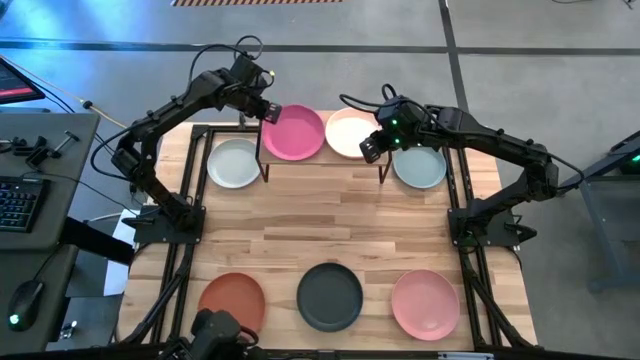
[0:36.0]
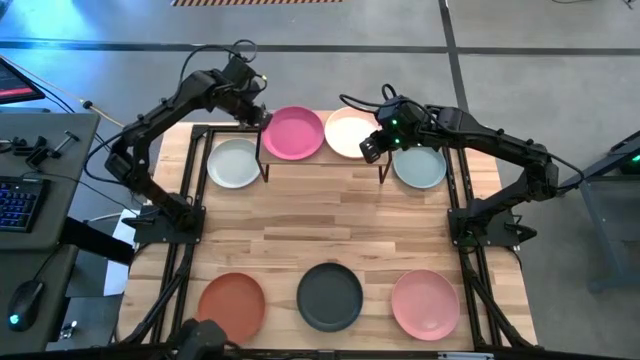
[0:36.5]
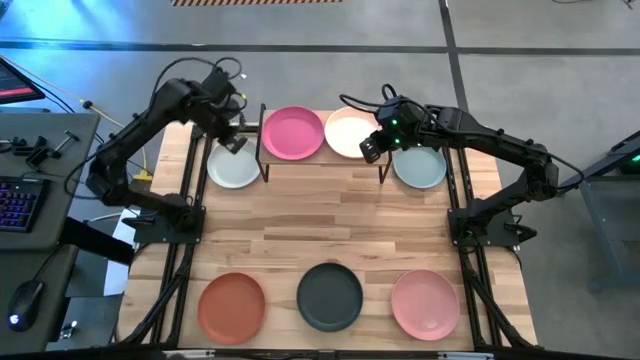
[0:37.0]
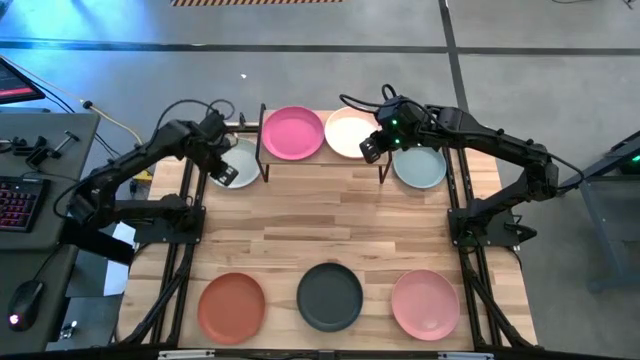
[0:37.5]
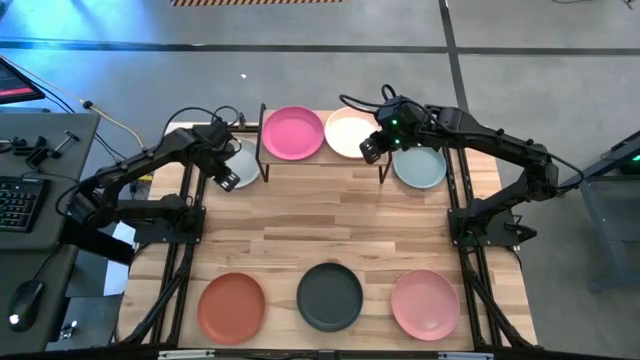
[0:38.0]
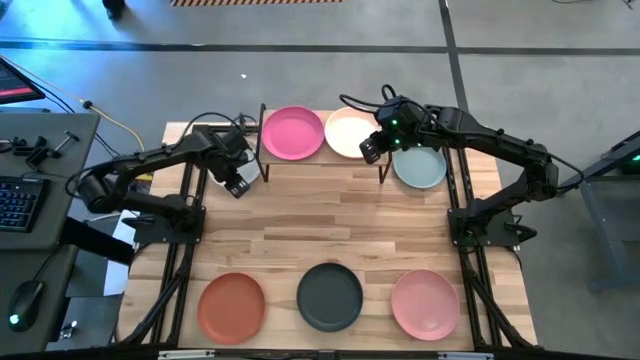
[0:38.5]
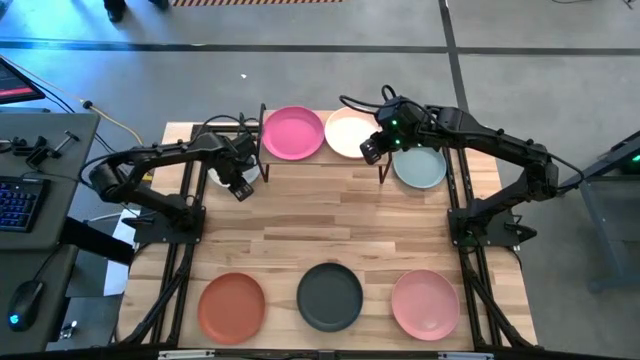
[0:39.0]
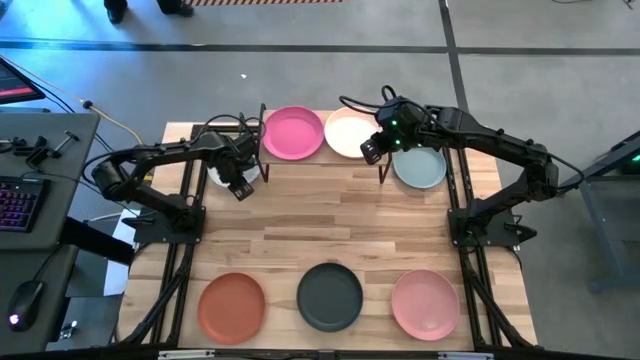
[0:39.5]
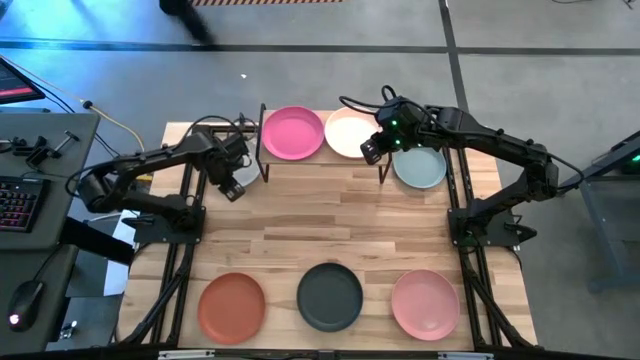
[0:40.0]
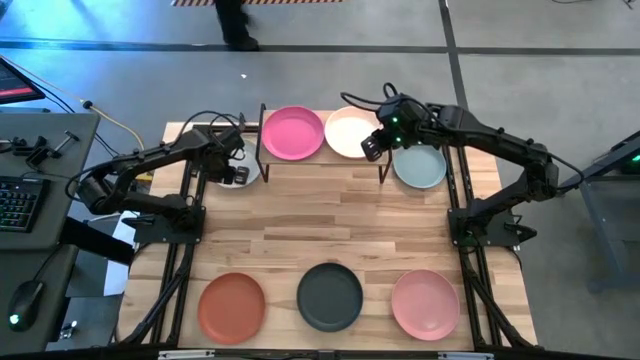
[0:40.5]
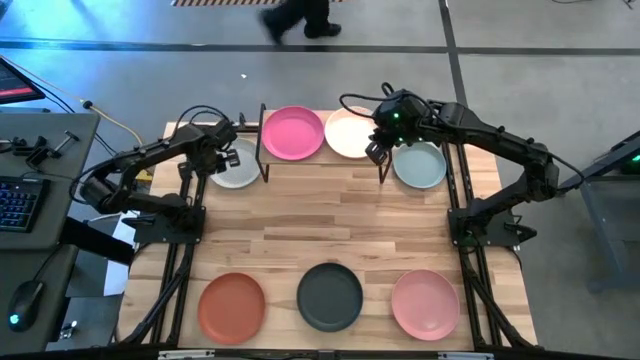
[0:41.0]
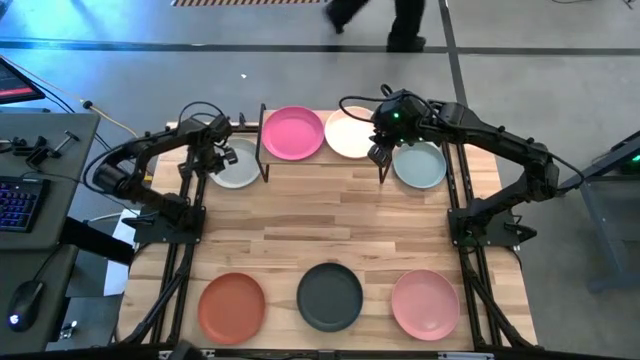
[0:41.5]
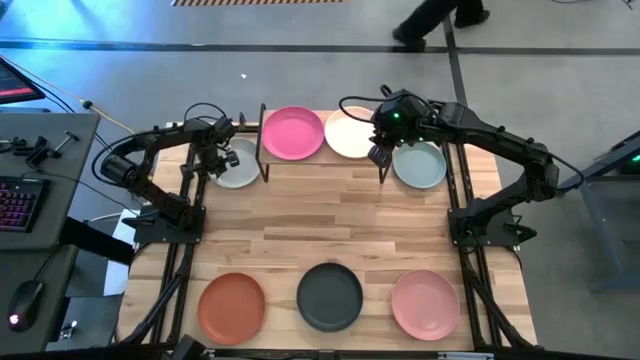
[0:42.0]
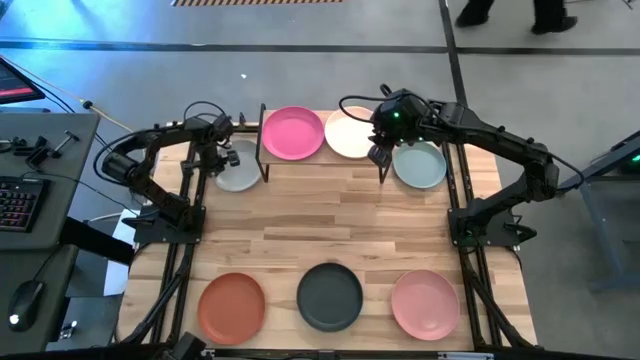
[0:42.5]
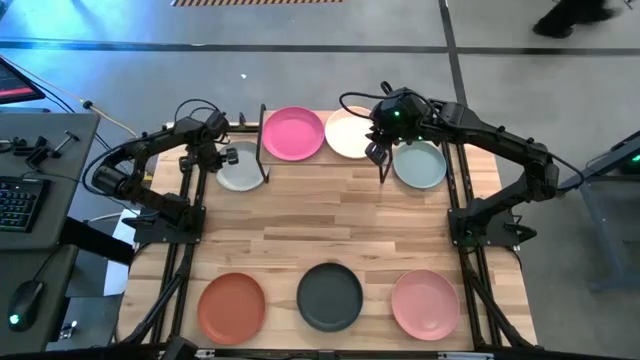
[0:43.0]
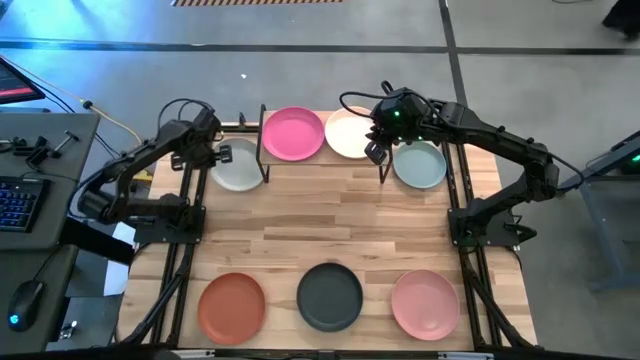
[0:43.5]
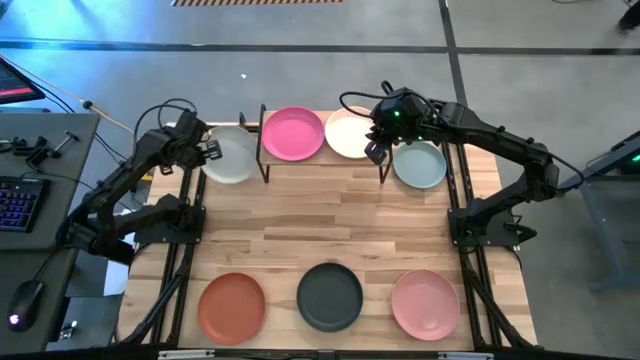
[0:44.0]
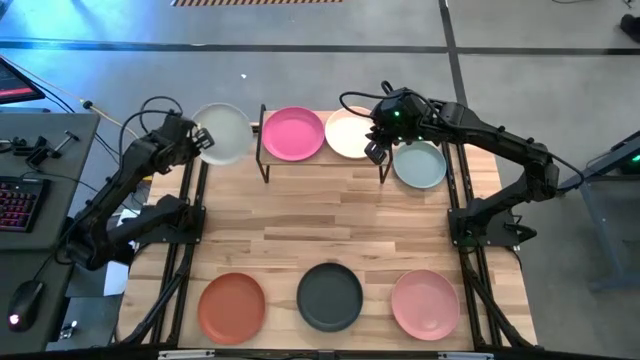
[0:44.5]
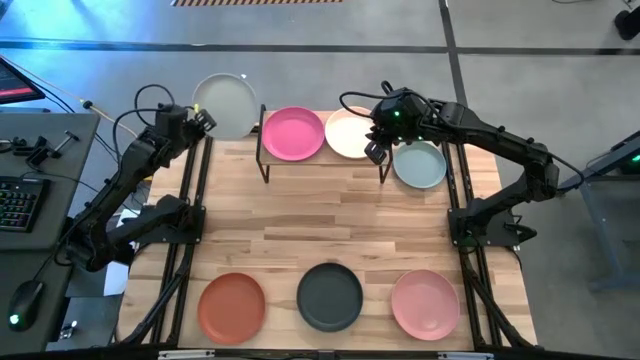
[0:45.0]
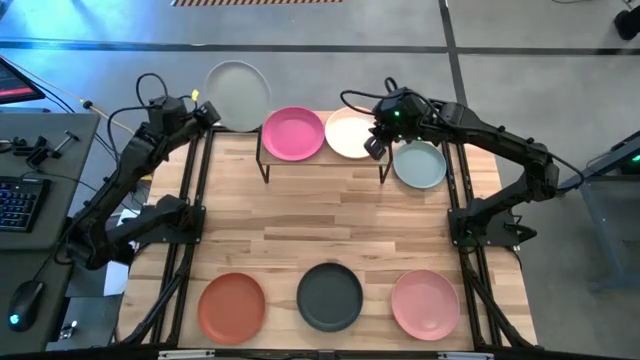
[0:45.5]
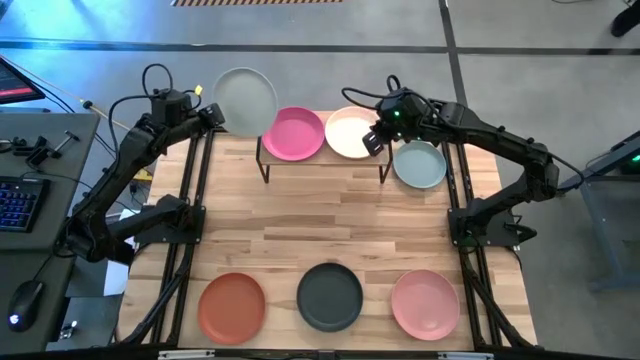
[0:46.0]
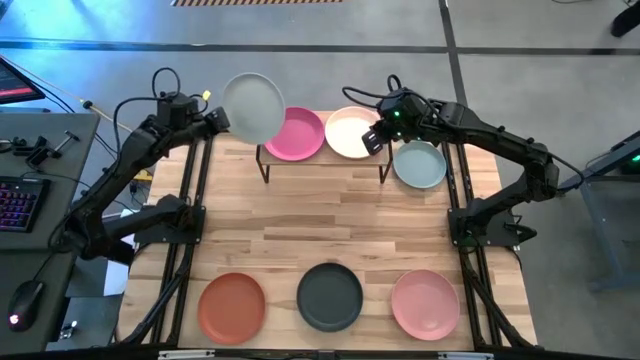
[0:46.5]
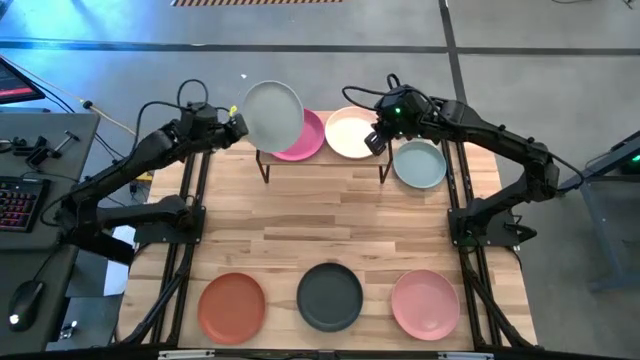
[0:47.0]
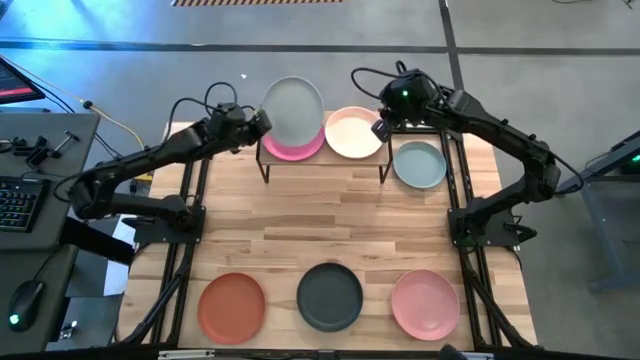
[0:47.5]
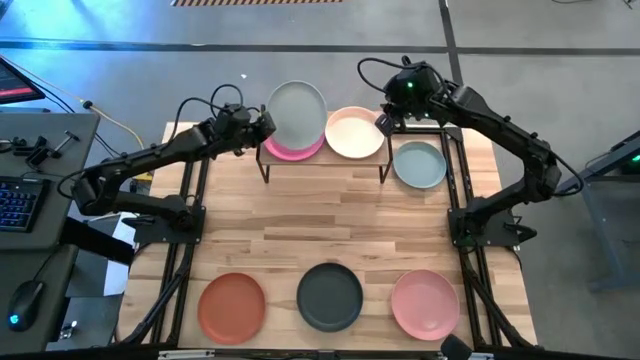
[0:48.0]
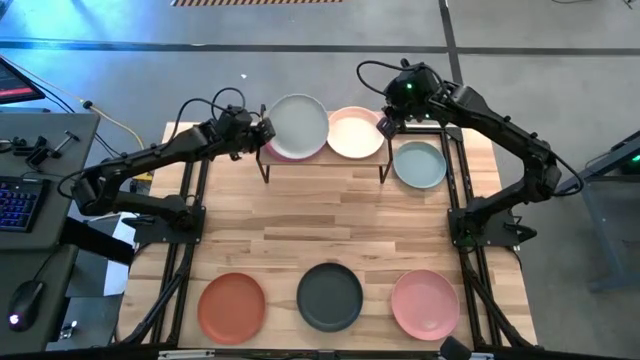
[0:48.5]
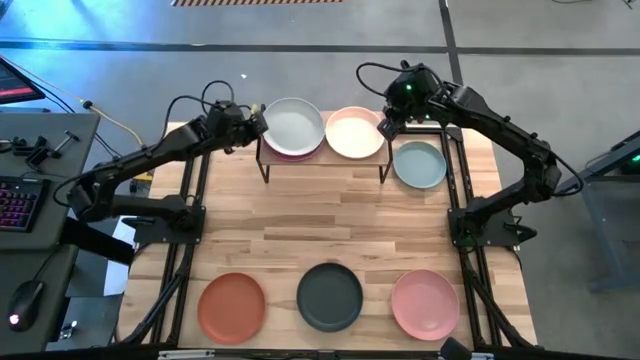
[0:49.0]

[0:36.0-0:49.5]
Task: Place and stack plates onto a shelf
Stack the gray plate on top of the pink plate on the shelf

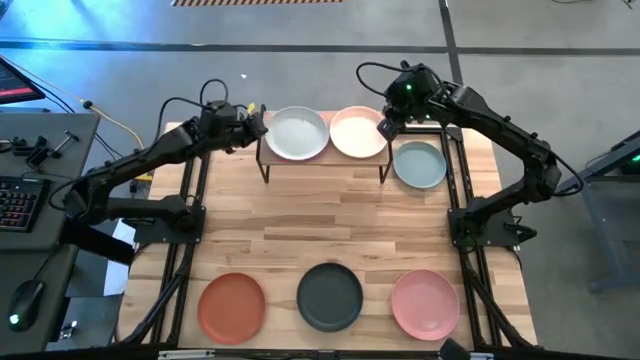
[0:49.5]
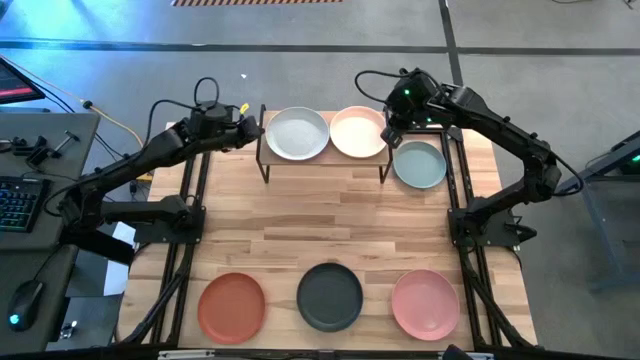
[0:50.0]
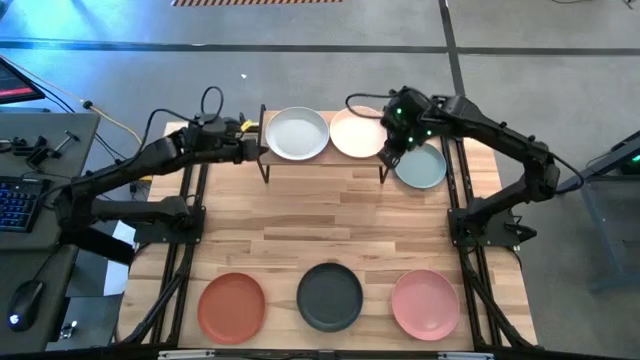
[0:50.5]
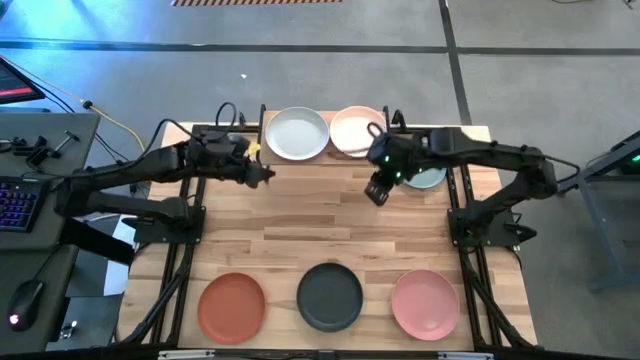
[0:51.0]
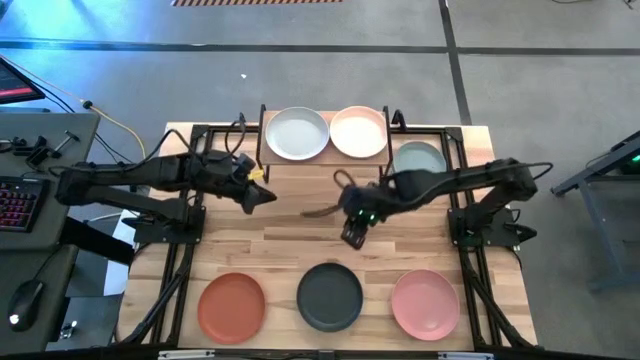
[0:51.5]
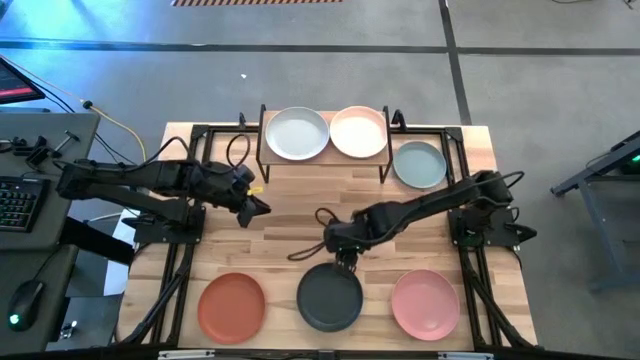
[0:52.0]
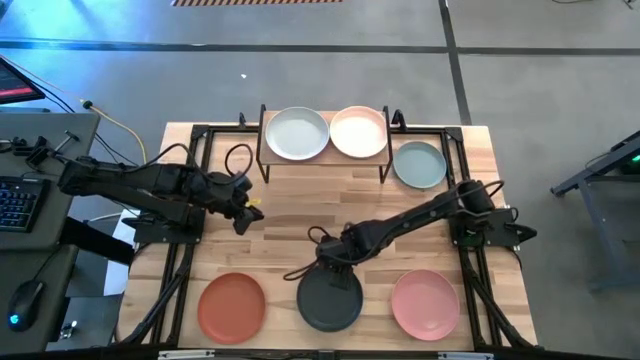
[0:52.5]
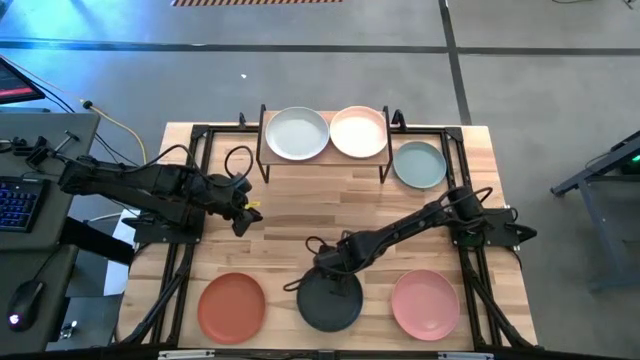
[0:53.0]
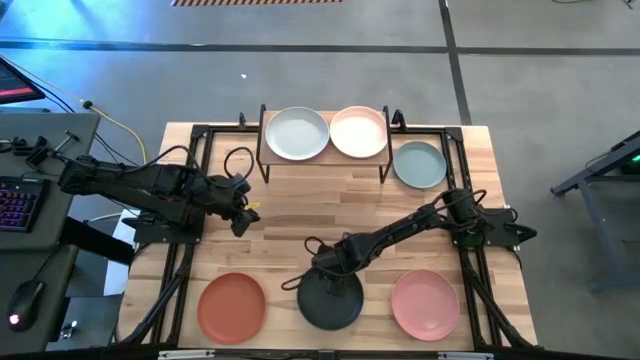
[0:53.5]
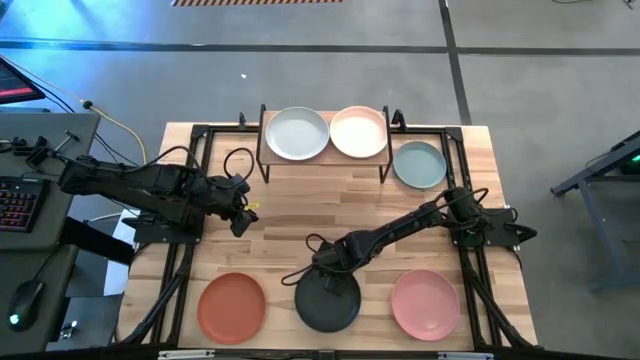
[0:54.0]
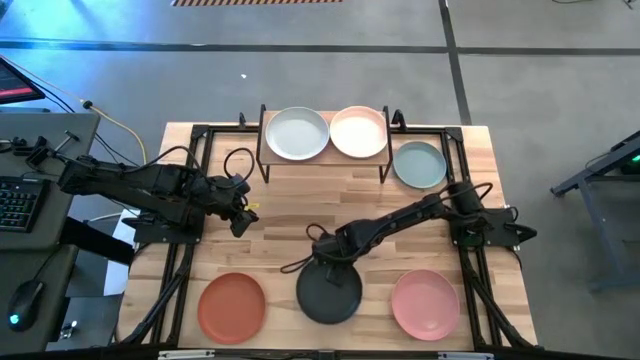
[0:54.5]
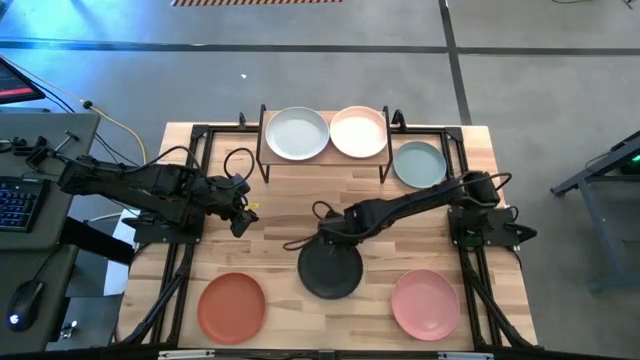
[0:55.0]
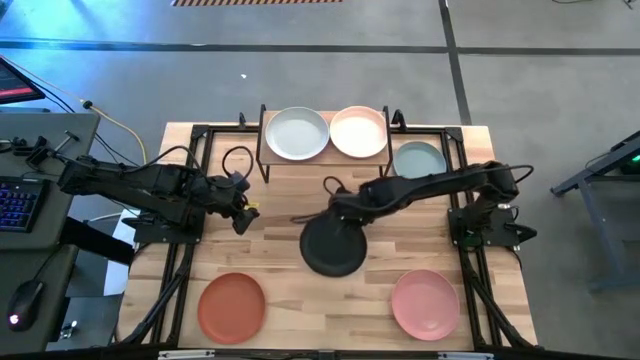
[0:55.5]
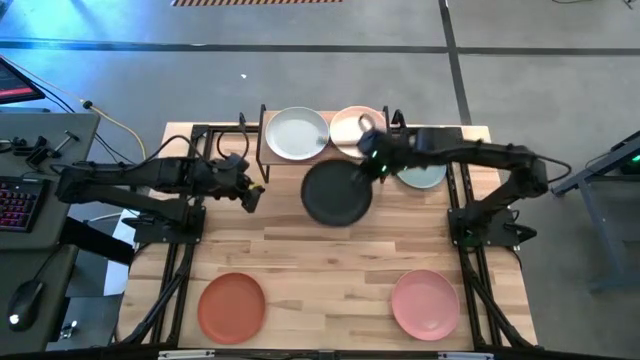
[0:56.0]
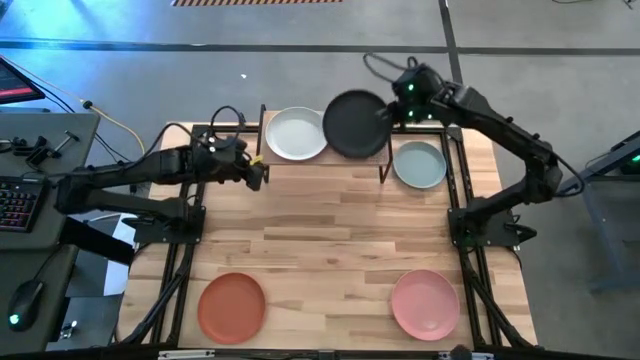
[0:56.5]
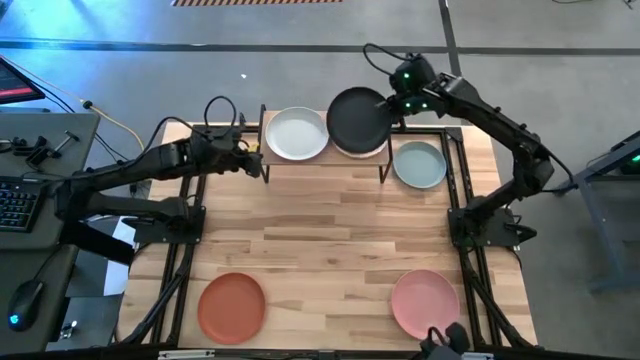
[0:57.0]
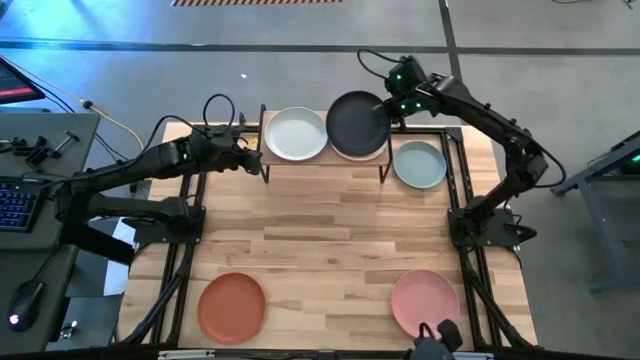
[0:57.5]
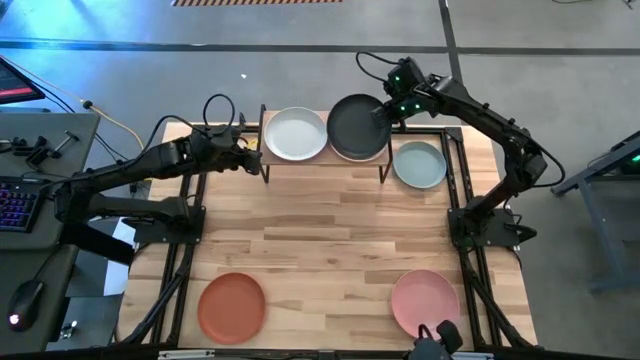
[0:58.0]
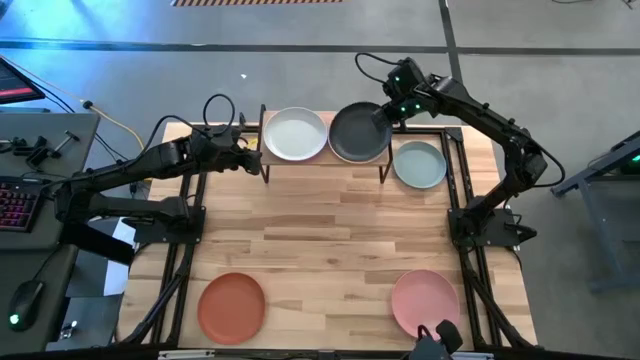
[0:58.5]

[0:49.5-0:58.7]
Stack the black plate on top of the light orange plate on the shelf
